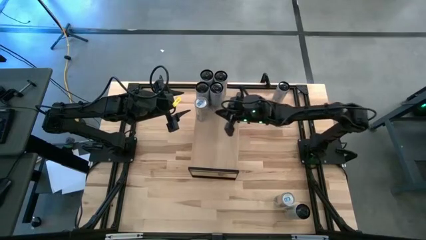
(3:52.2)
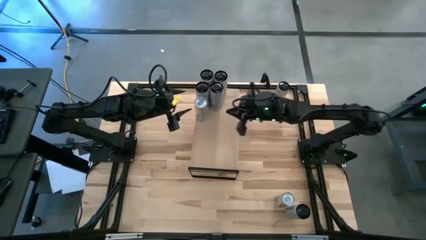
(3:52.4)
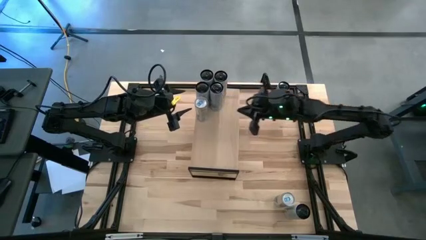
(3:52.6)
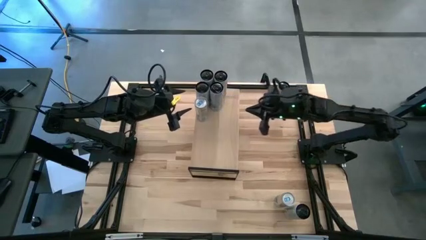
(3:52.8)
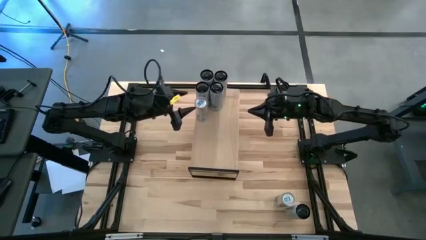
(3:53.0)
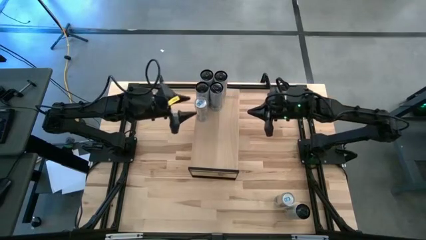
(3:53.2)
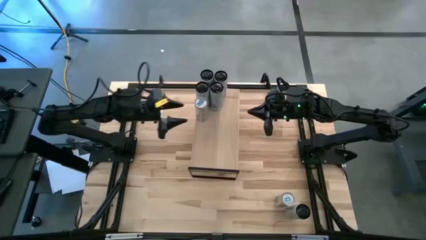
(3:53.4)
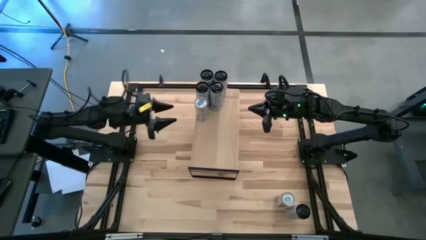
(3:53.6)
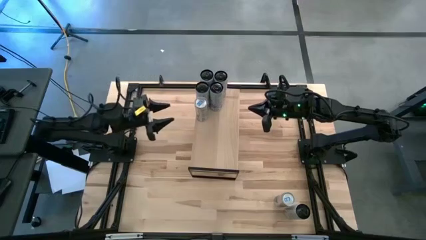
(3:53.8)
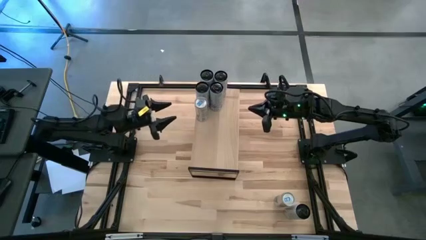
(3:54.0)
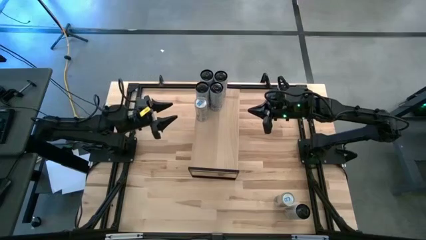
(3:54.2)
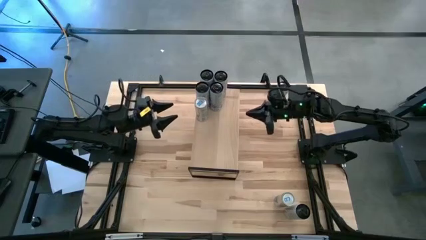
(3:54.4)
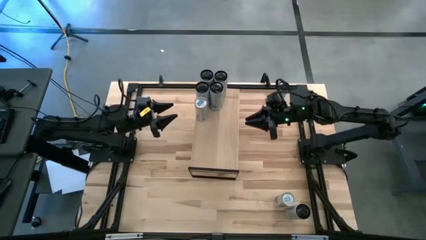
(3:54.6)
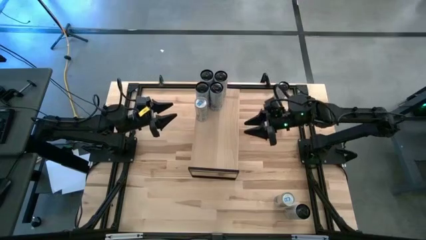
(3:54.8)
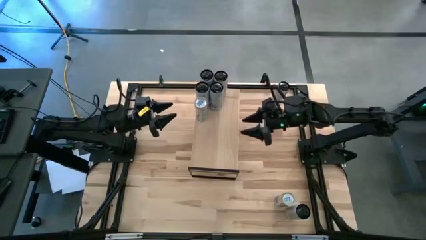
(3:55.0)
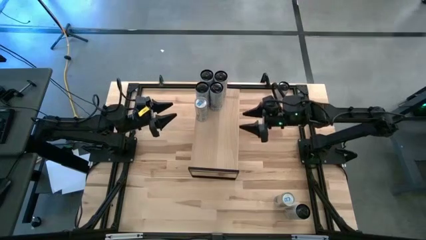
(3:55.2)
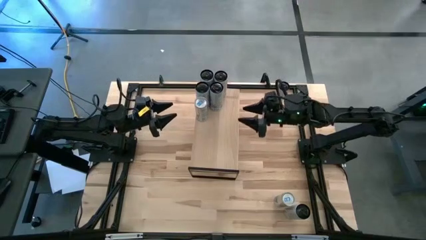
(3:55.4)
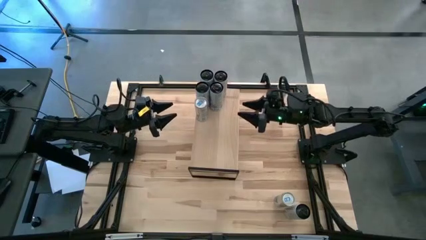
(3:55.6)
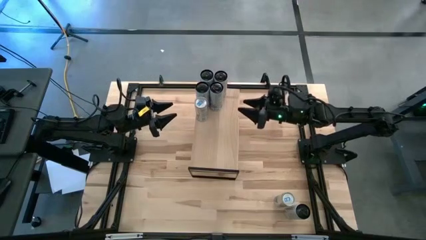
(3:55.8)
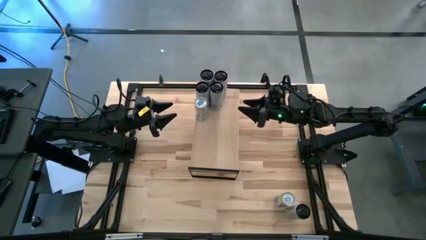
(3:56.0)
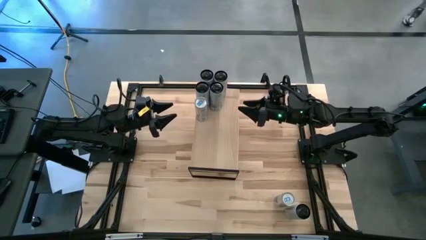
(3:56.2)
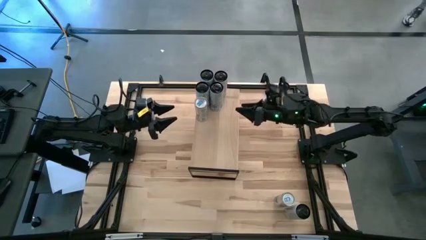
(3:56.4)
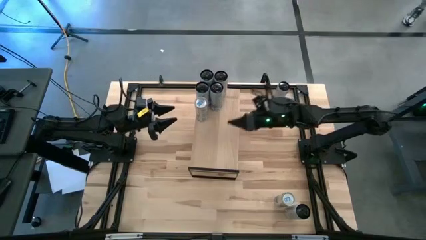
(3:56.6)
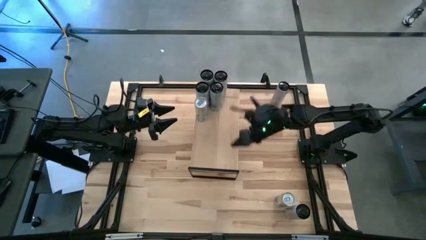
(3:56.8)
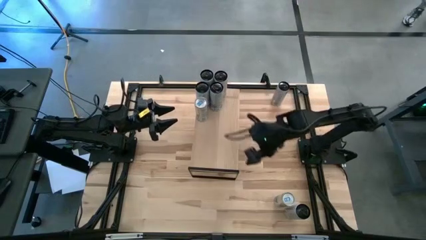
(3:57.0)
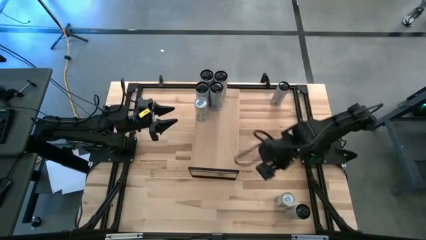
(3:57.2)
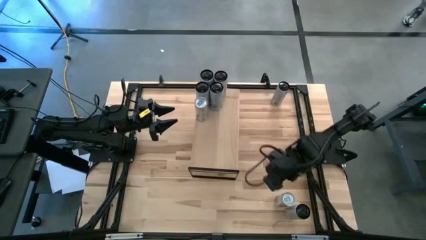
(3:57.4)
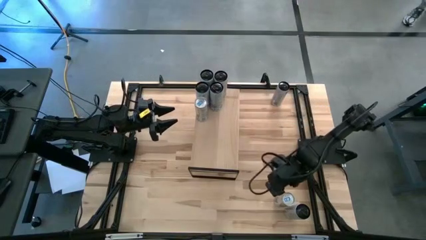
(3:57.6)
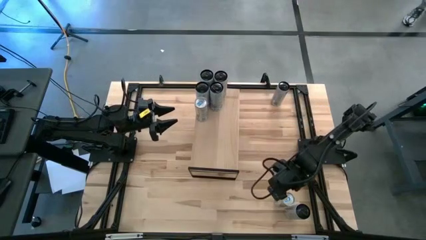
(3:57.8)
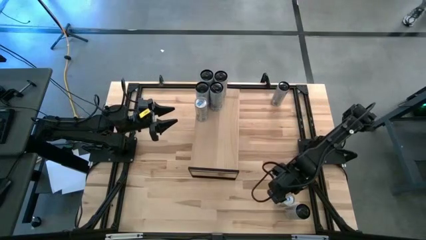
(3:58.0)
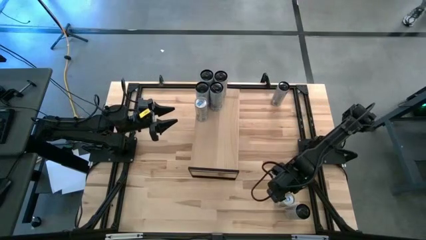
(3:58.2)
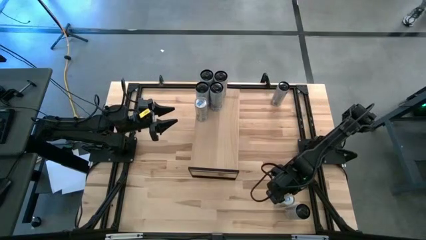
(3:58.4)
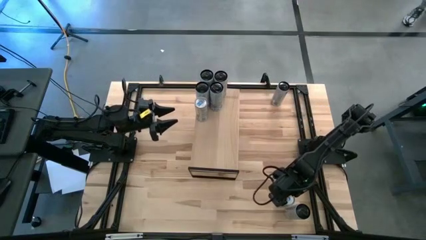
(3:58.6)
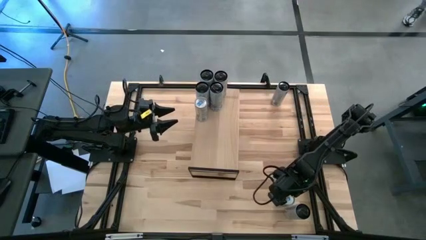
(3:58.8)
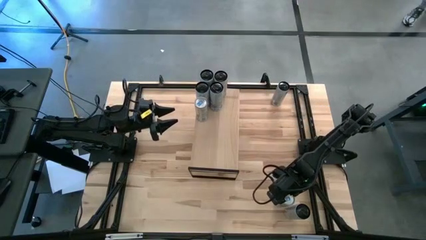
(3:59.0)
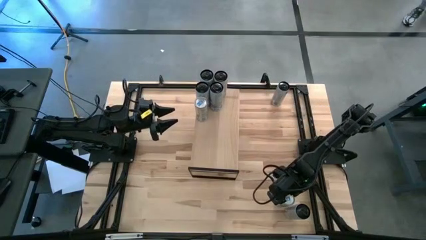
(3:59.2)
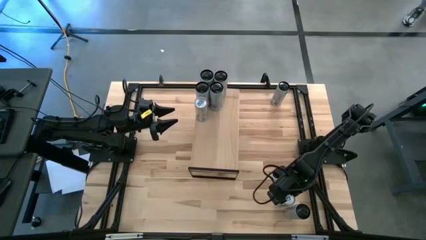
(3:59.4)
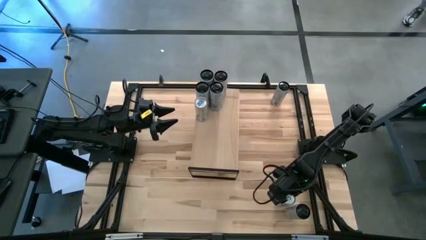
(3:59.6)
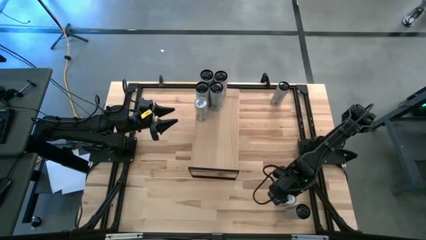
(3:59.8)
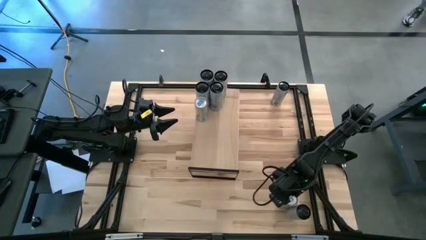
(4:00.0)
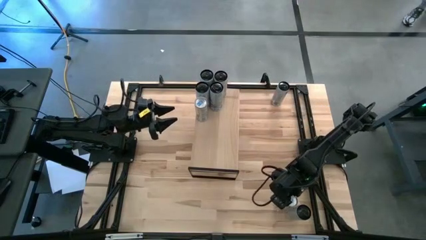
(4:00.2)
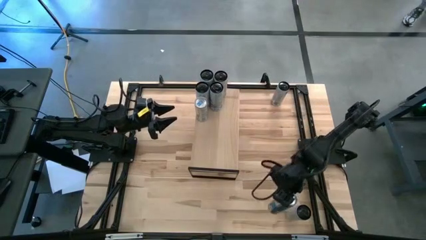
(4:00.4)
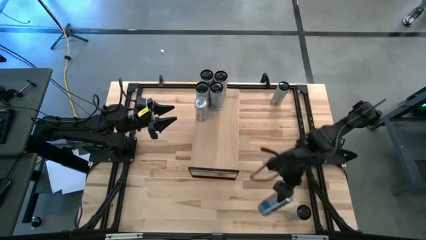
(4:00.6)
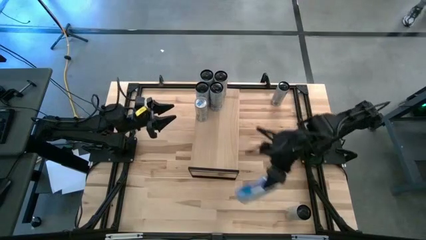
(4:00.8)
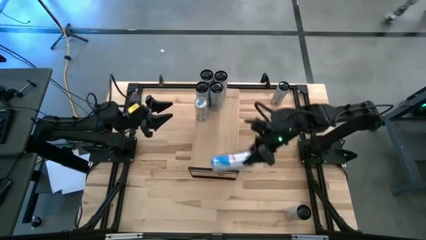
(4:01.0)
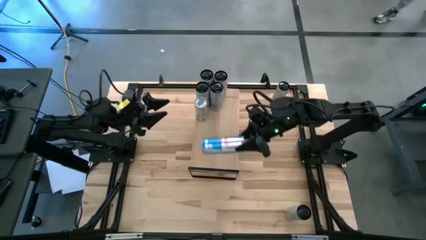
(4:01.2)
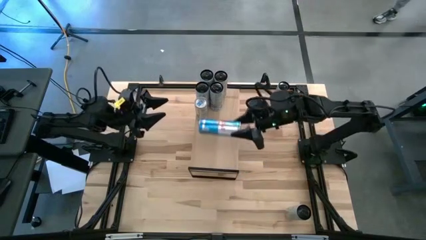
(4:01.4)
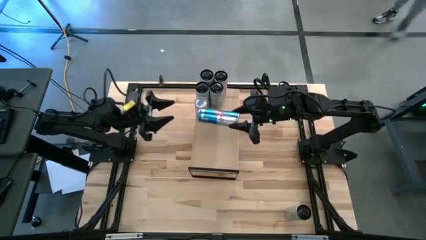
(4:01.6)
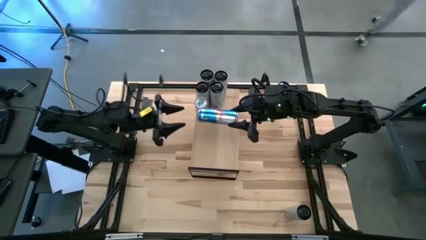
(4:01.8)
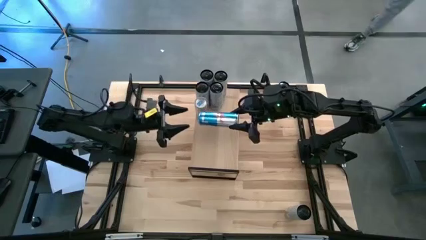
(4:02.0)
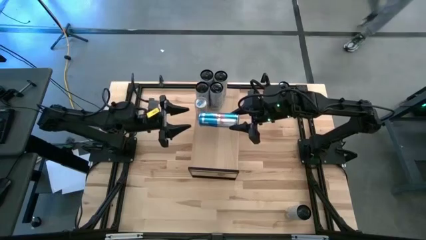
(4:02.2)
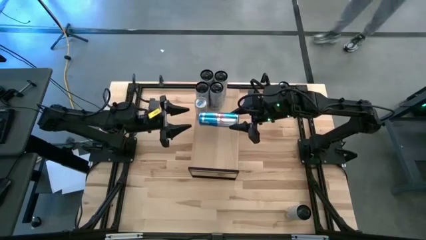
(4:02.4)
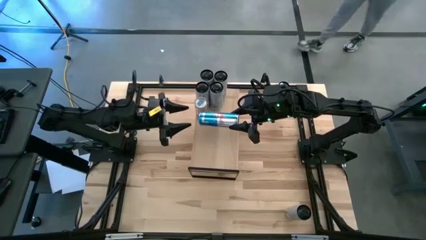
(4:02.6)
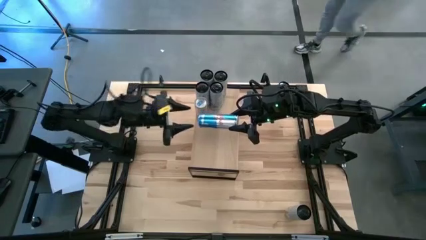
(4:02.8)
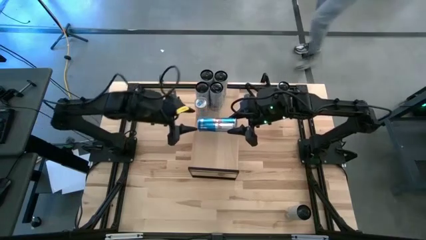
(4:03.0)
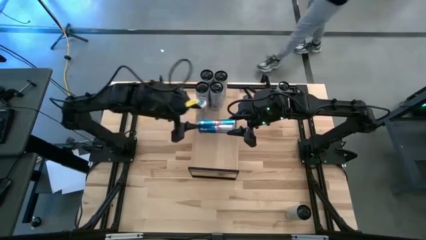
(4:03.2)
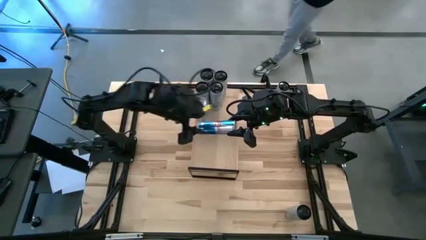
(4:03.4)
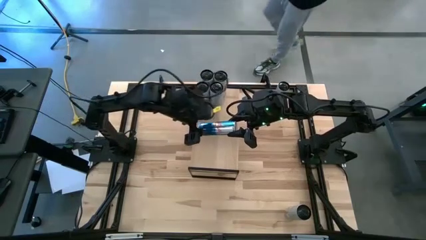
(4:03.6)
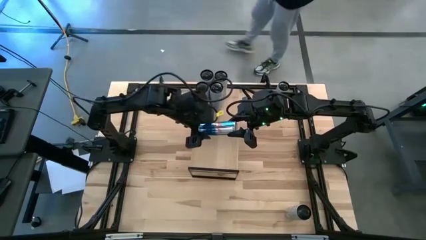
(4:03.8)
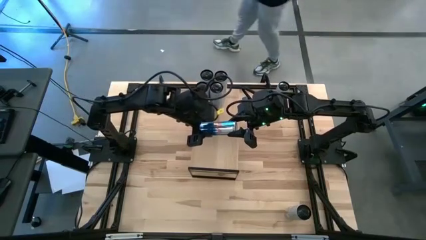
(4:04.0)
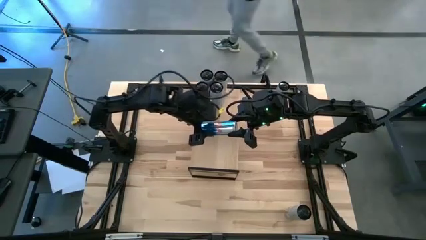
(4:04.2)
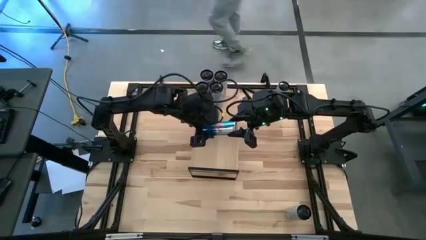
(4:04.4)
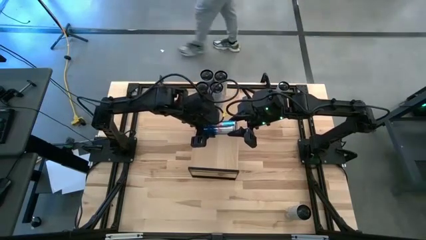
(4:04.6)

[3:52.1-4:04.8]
Task: Place canned beverage on shelf
Put the blue soda can on the shelf aligned with the blue soda can
